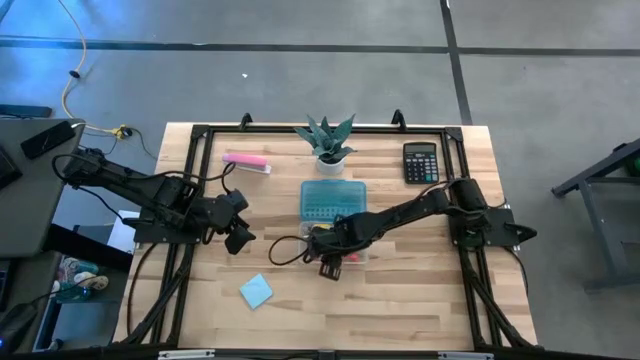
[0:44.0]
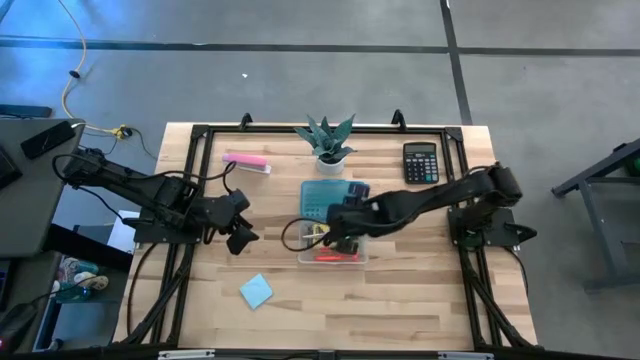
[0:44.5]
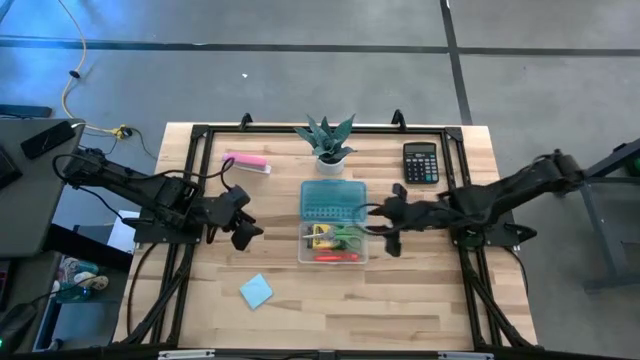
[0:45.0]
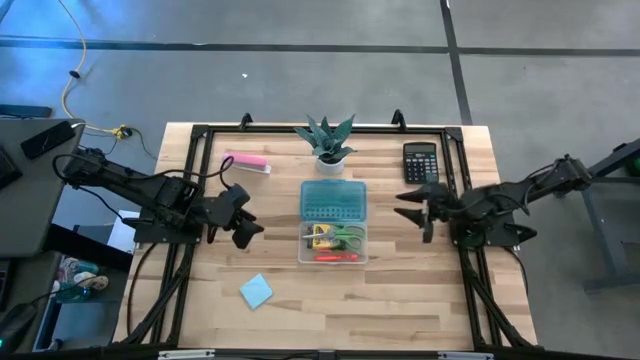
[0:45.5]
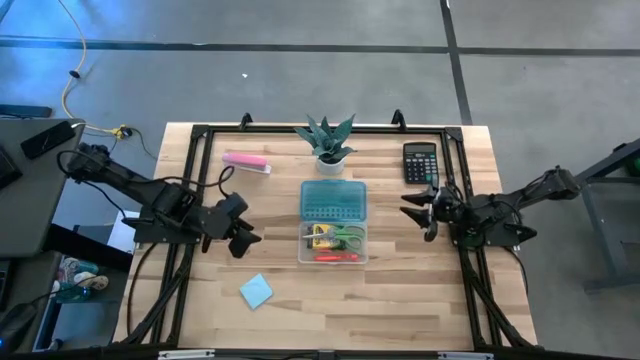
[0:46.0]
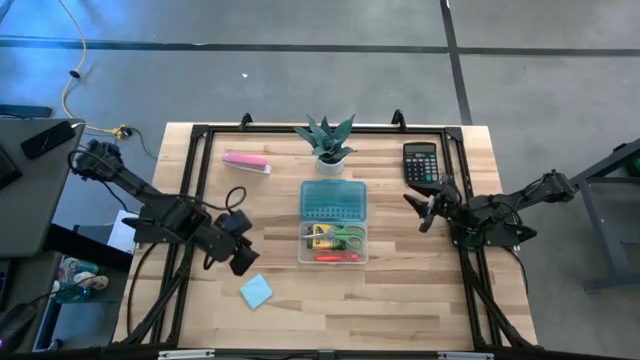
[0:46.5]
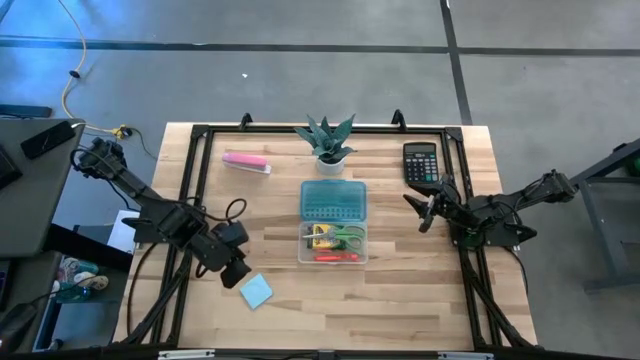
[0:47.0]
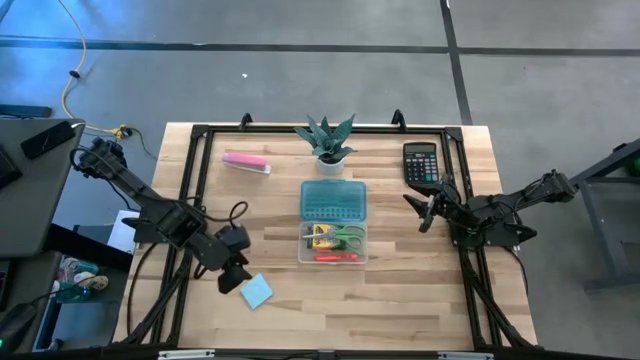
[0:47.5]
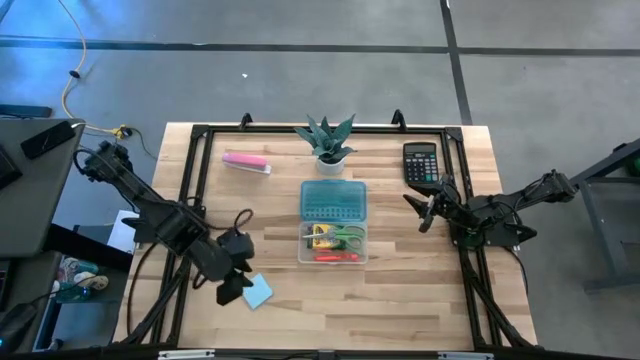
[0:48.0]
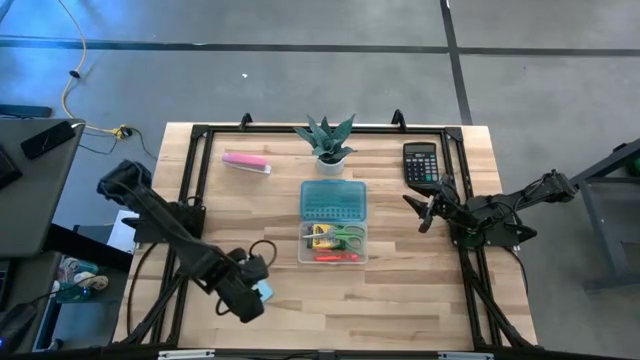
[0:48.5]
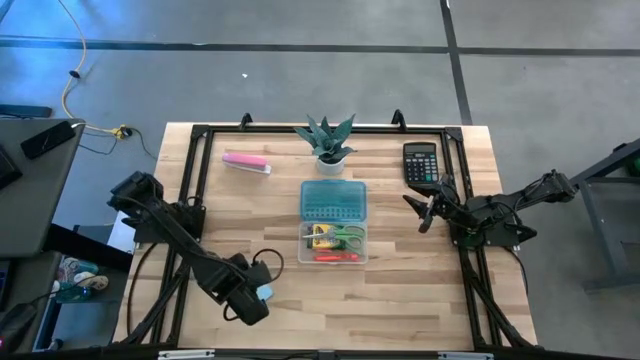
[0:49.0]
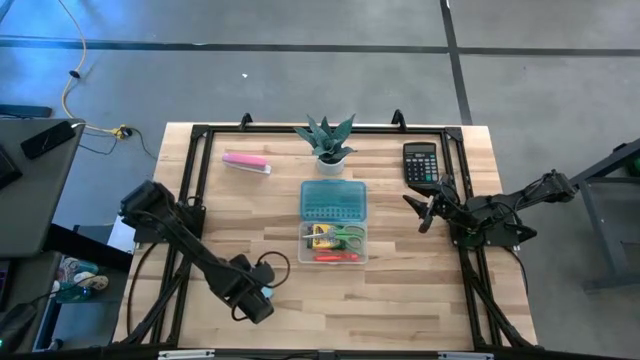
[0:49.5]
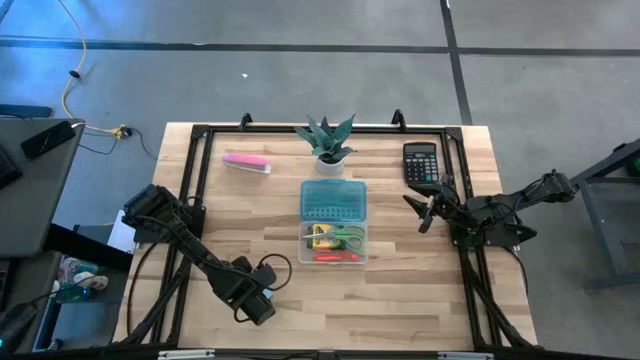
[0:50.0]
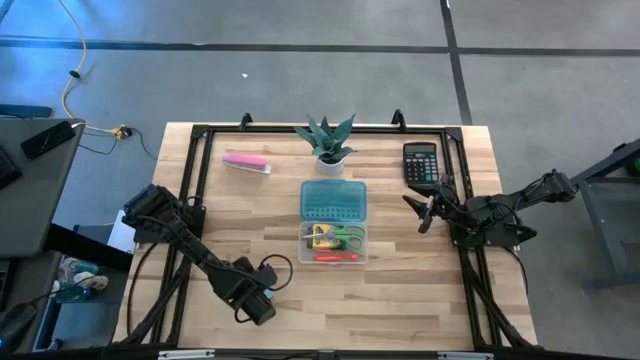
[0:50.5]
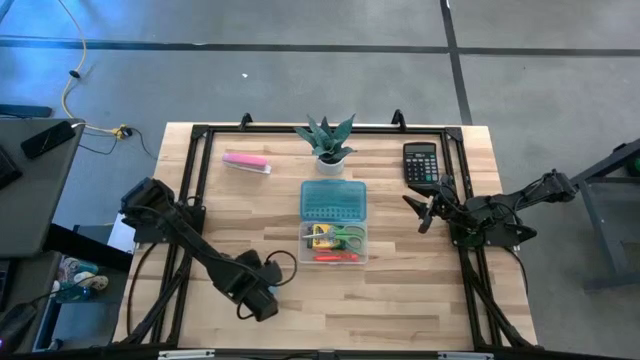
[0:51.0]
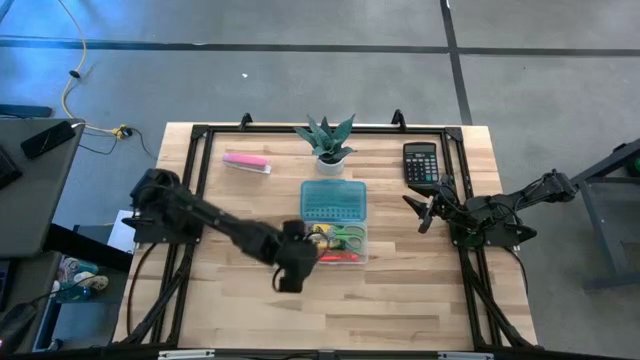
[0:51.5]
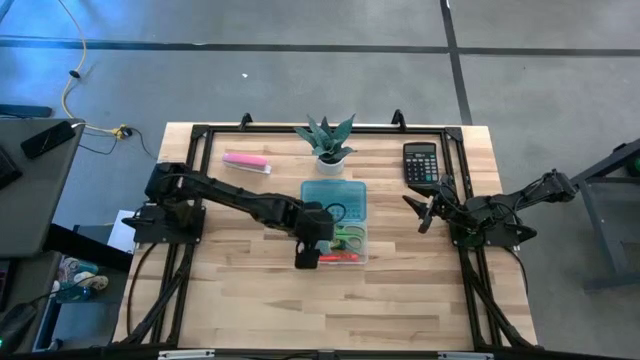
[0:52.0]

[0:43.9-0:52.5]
Task: Pack school essentials
Put the blue sticky note into the supply box

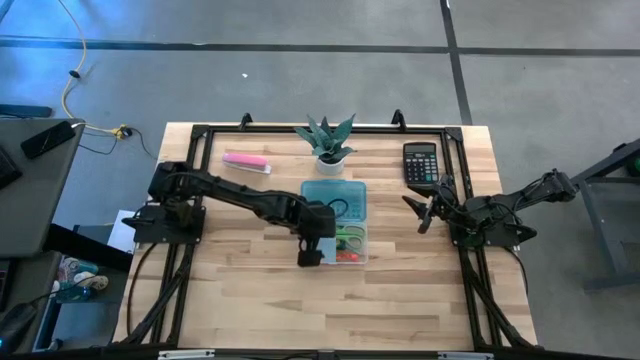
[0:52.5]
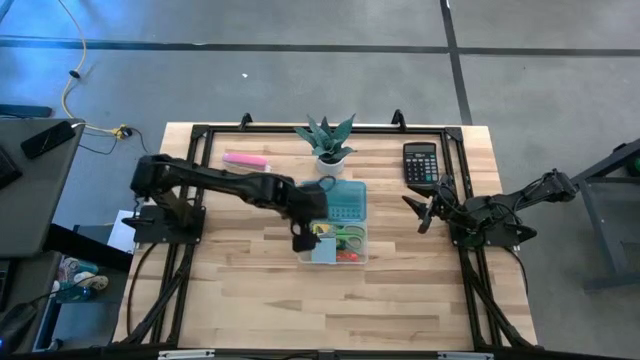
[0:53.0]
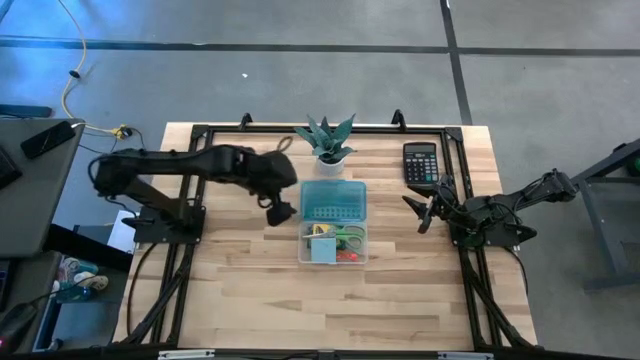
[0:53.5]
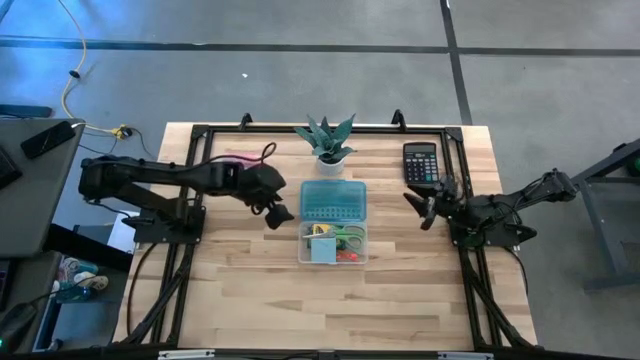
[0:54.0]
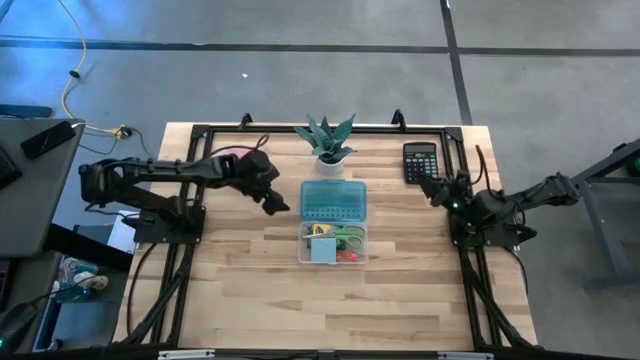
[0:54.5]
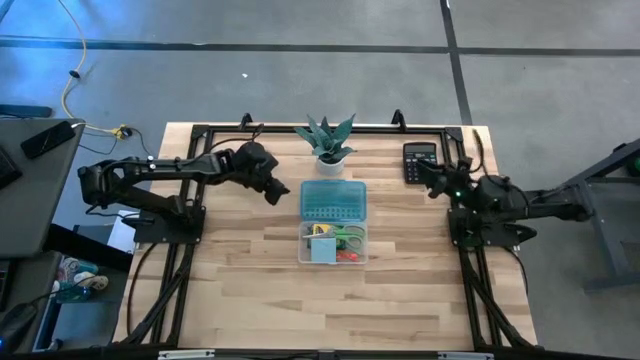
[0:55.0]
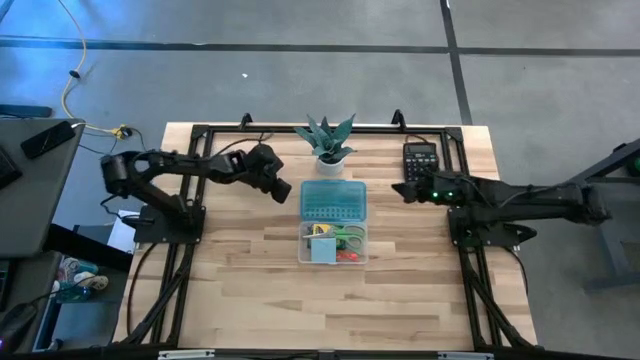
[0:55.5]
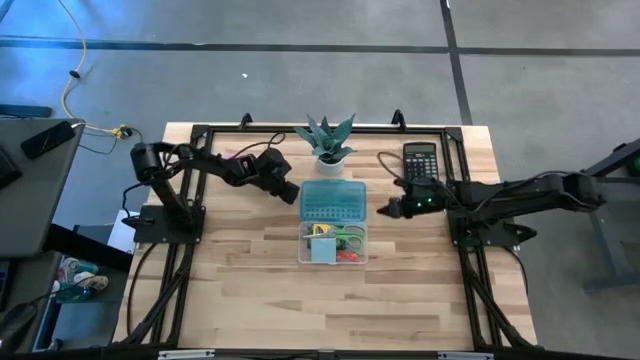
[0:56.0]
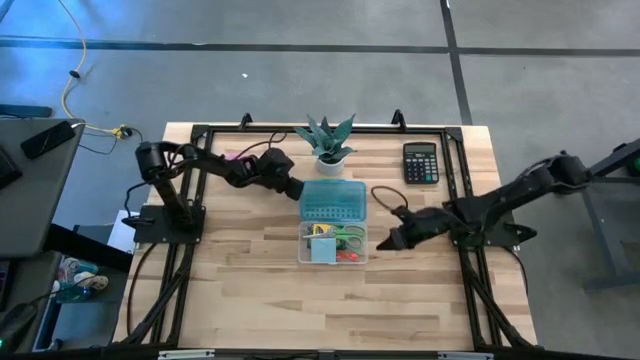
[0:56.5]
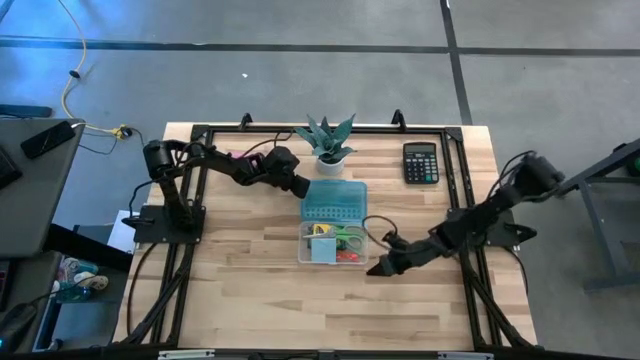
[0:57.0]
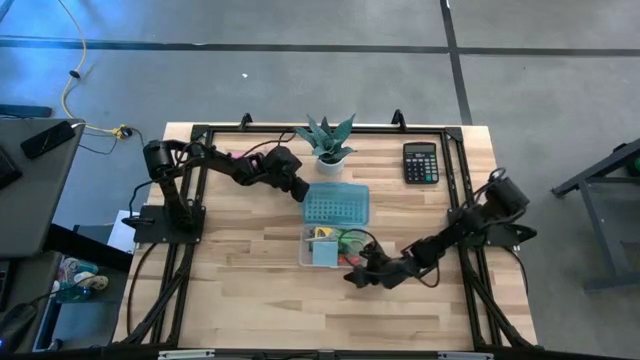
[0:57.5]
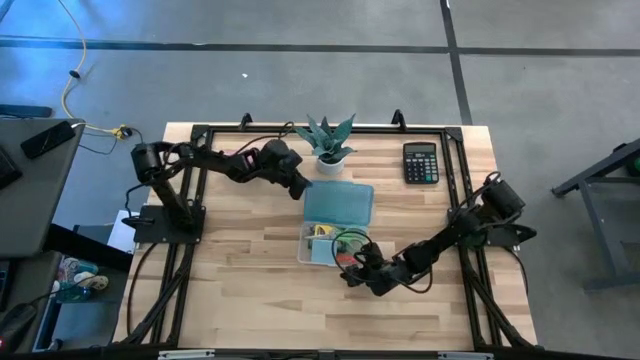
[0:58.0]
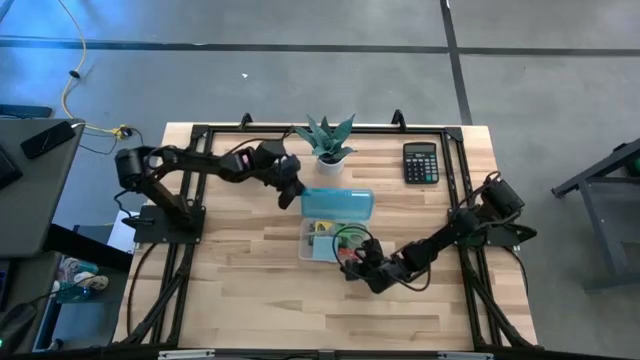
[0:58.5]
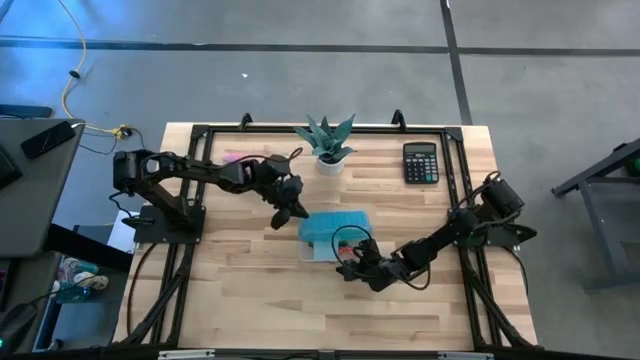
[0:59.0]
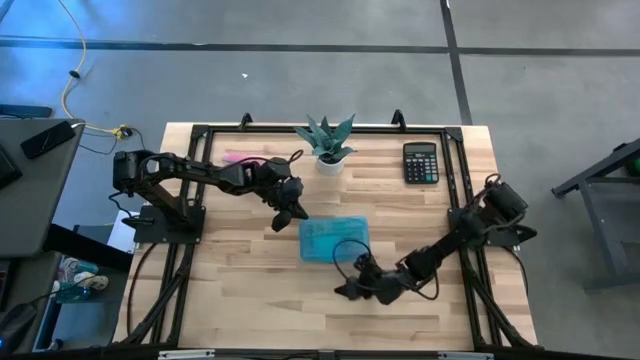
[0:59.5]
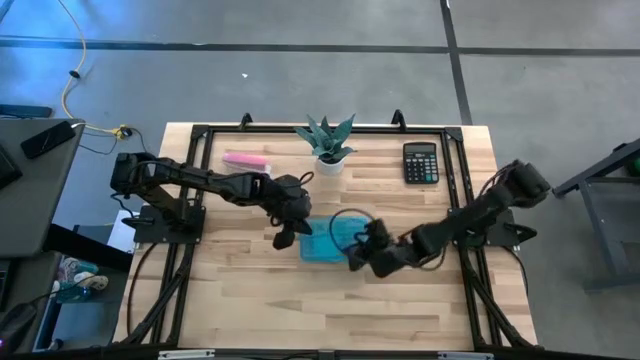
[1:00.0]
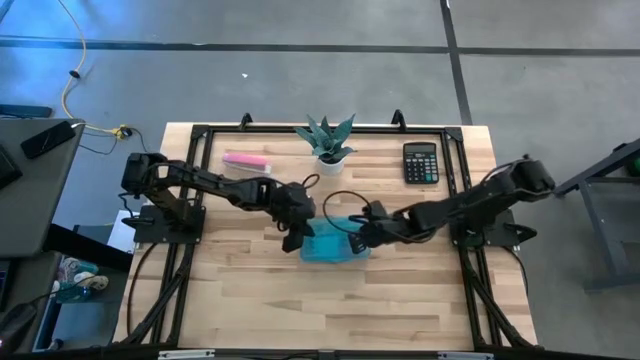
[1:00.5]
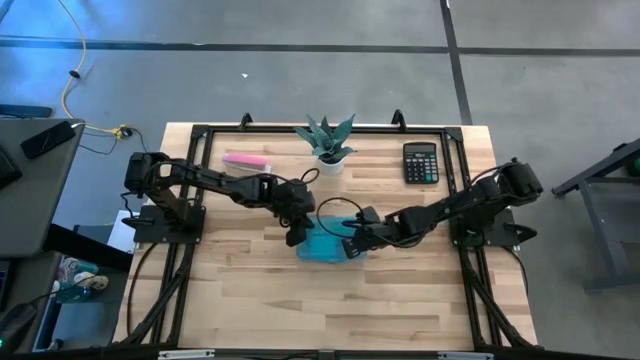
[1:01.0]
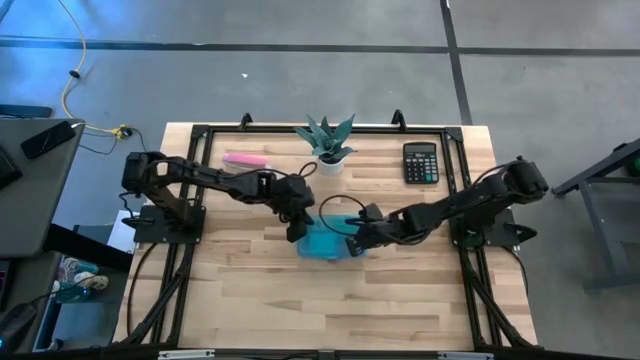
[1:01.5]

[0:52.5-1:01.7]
Close the supply box

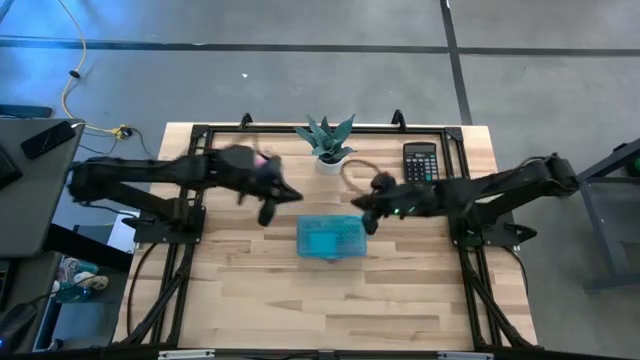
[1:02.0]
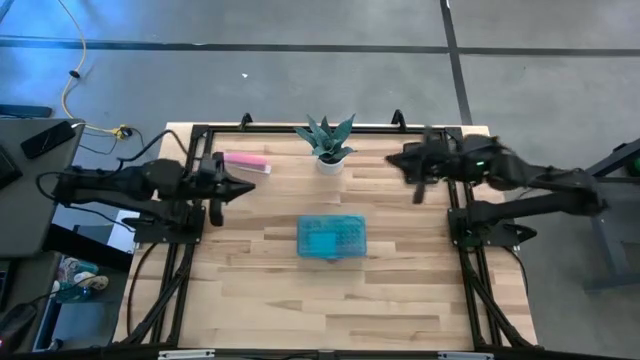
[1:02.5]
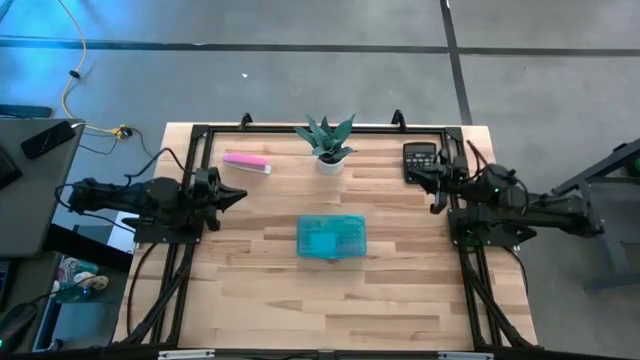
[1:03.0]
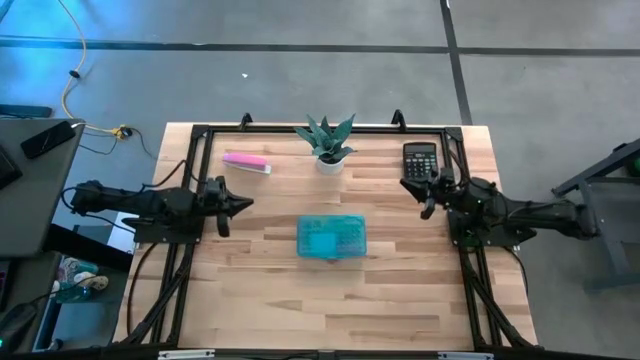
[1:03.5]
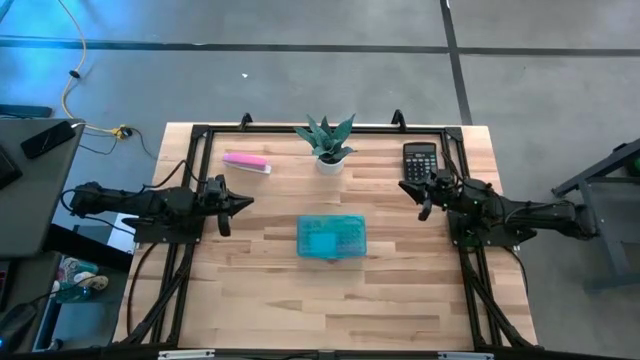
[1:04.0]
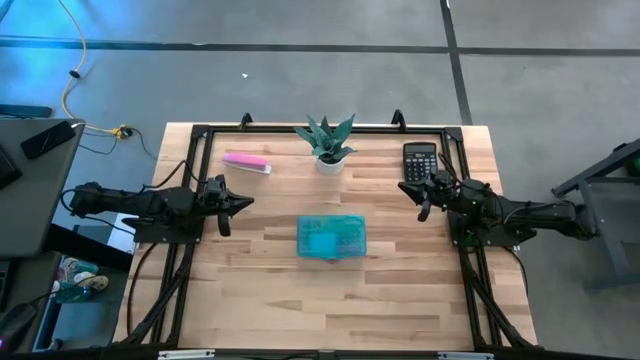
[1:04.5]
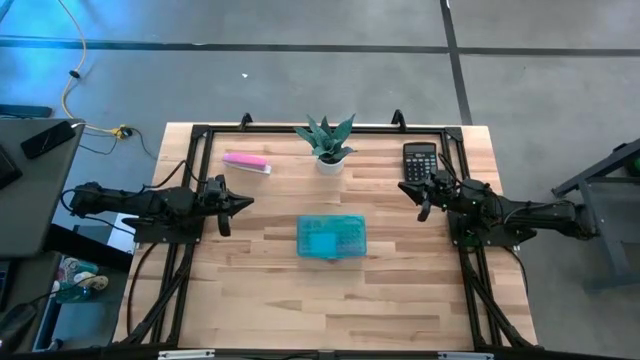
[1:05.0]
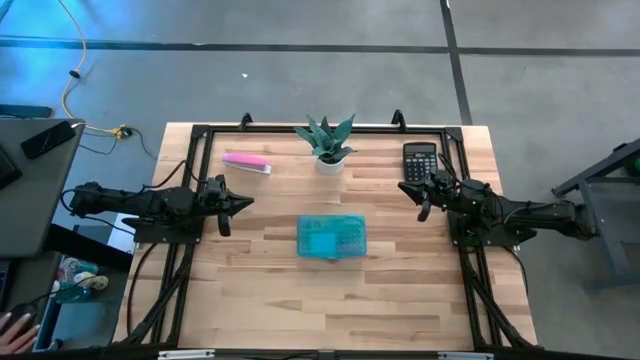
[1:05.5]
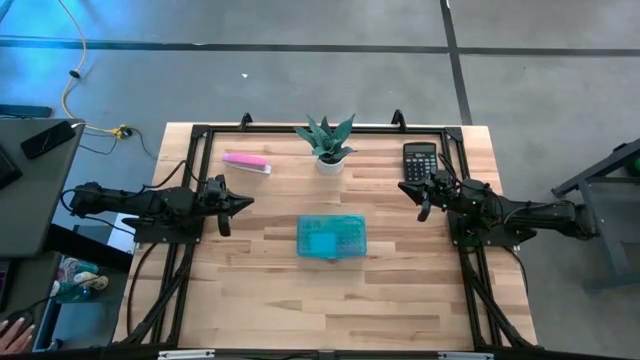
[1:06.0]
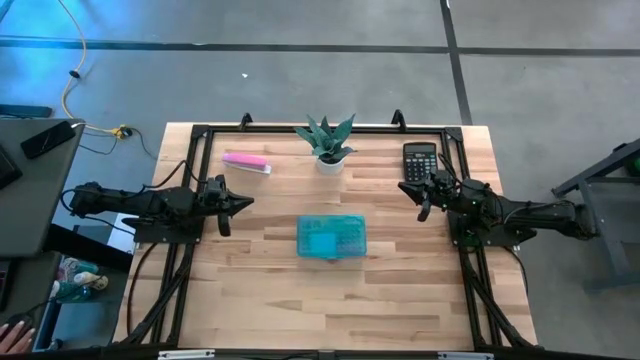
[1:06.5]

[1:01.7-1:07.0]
Return to Home Position
